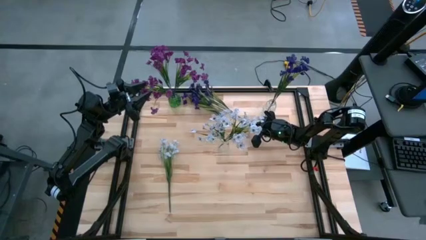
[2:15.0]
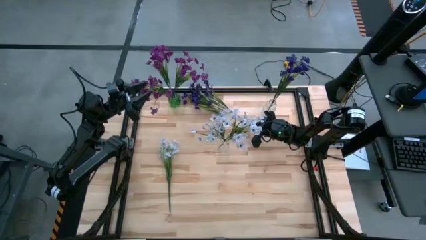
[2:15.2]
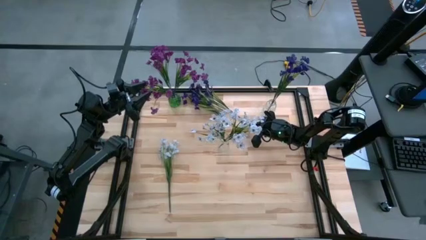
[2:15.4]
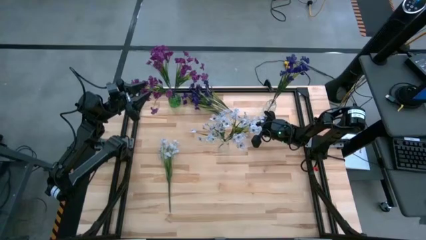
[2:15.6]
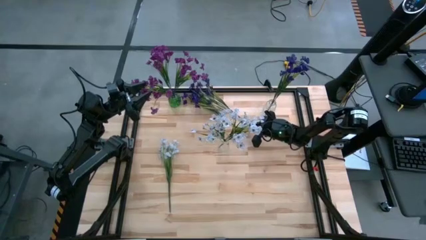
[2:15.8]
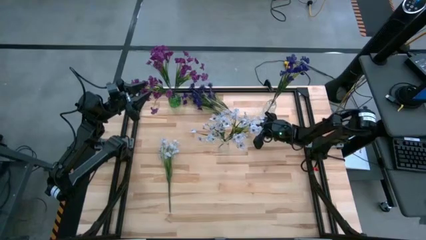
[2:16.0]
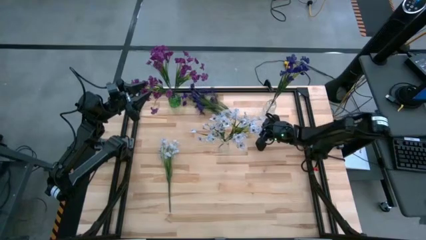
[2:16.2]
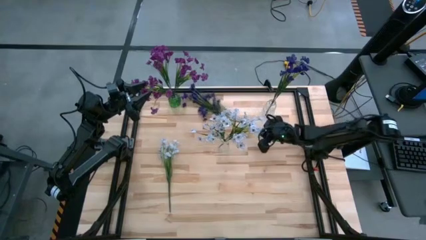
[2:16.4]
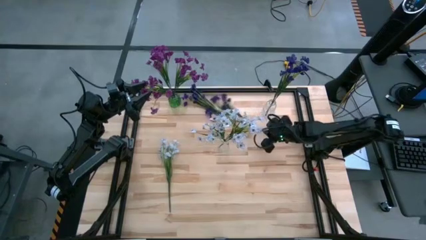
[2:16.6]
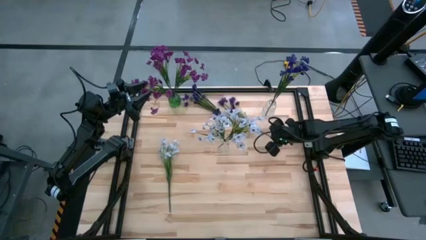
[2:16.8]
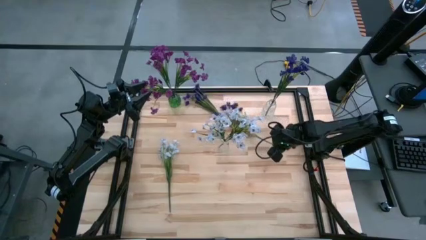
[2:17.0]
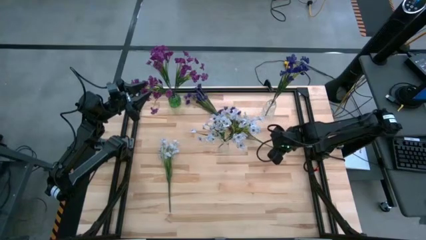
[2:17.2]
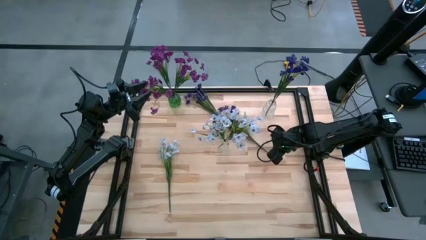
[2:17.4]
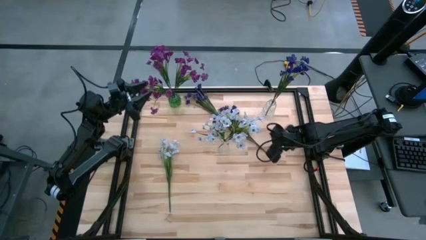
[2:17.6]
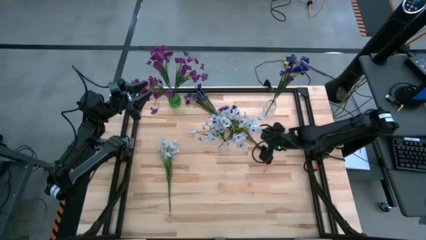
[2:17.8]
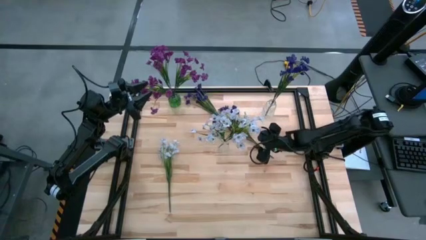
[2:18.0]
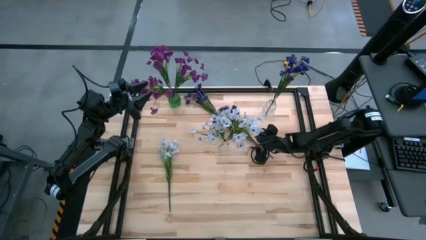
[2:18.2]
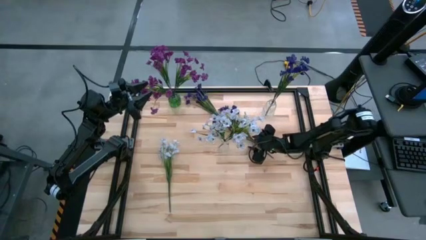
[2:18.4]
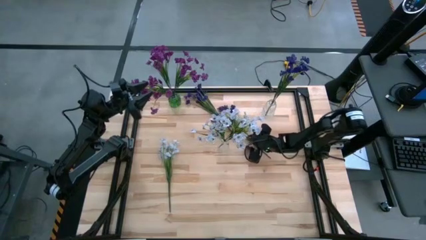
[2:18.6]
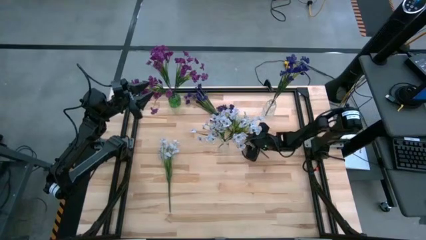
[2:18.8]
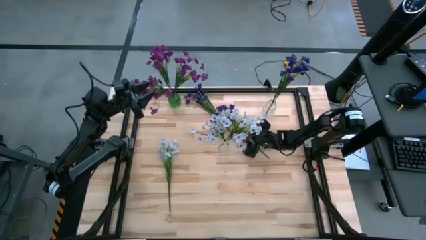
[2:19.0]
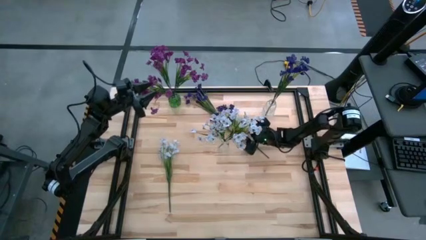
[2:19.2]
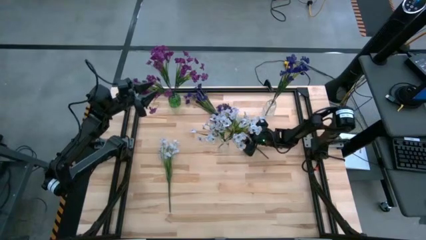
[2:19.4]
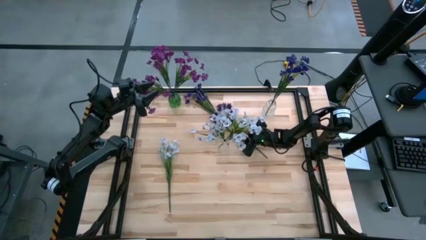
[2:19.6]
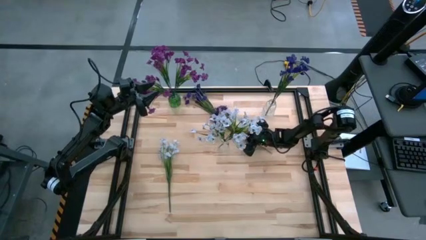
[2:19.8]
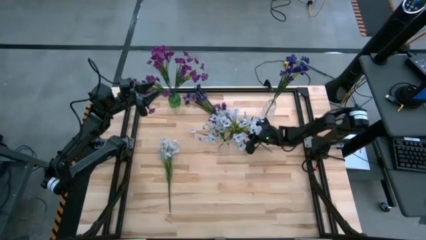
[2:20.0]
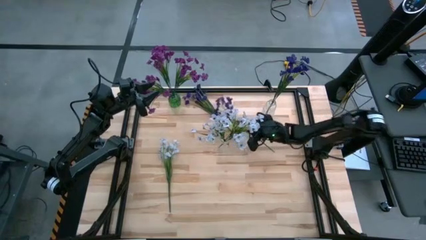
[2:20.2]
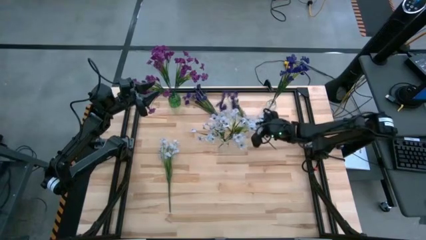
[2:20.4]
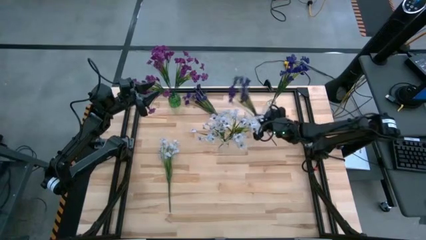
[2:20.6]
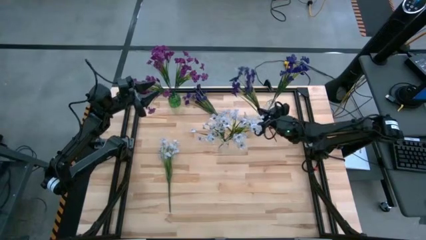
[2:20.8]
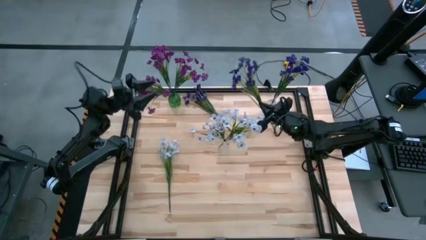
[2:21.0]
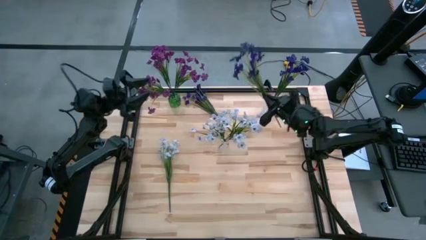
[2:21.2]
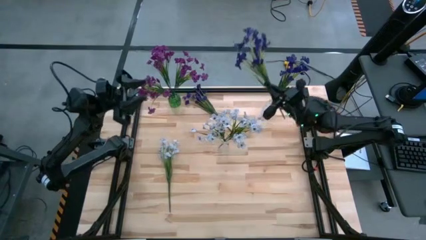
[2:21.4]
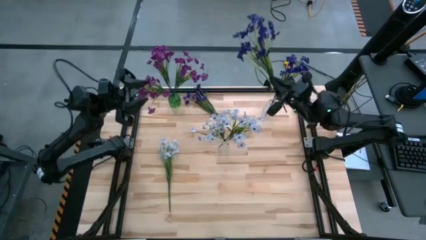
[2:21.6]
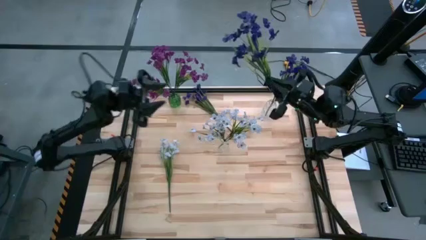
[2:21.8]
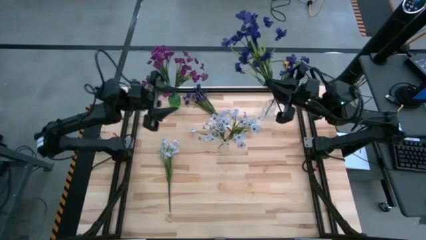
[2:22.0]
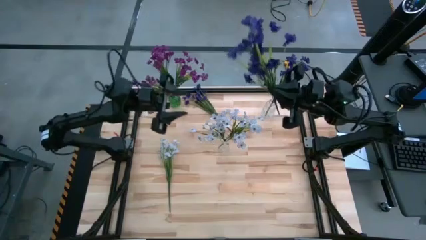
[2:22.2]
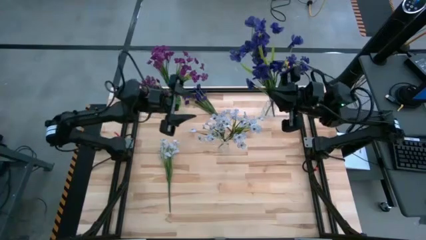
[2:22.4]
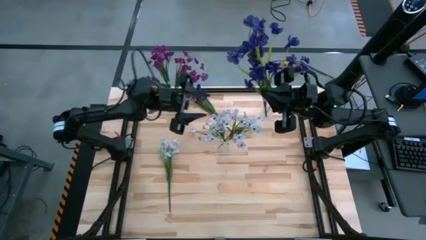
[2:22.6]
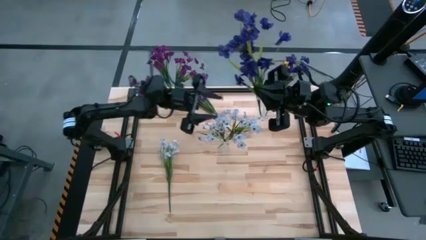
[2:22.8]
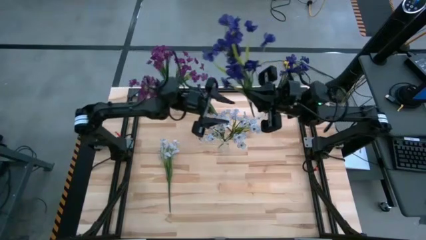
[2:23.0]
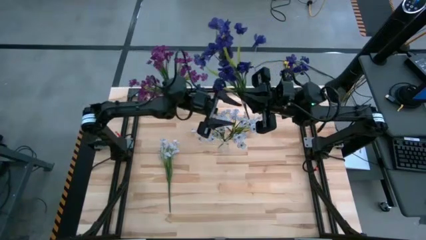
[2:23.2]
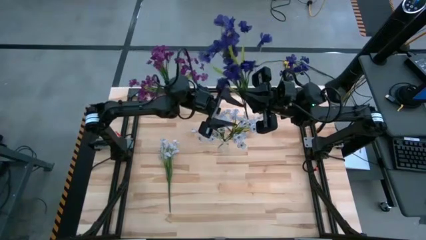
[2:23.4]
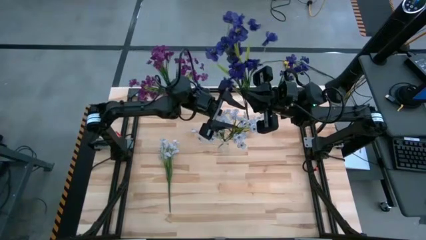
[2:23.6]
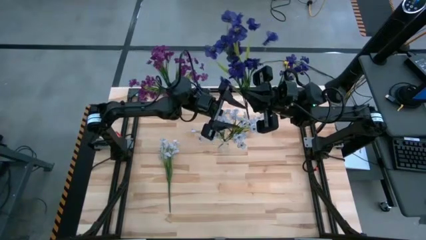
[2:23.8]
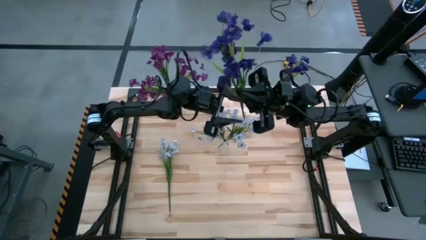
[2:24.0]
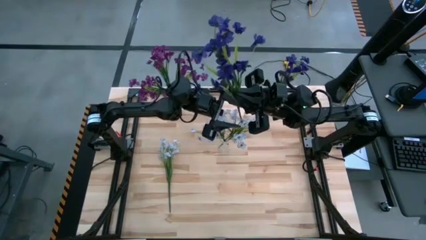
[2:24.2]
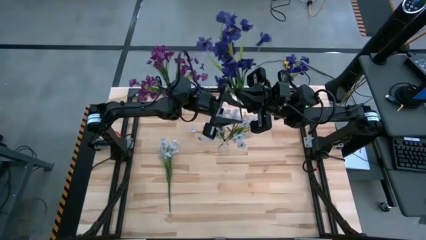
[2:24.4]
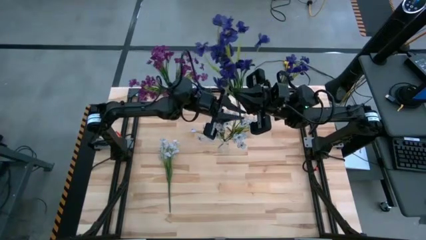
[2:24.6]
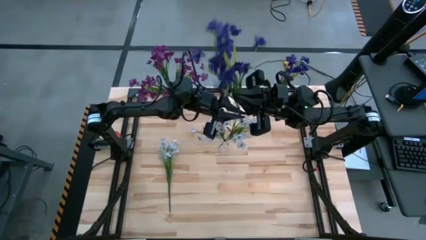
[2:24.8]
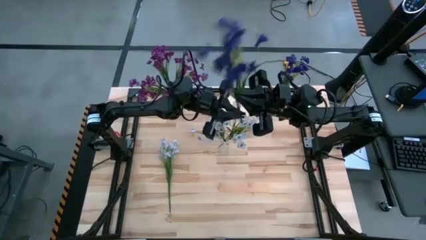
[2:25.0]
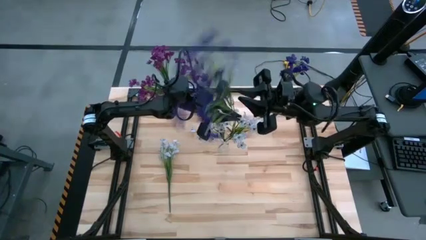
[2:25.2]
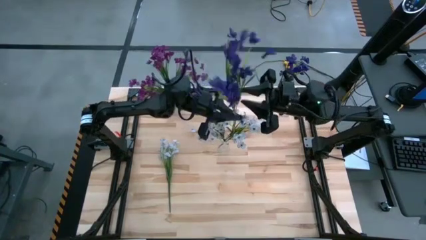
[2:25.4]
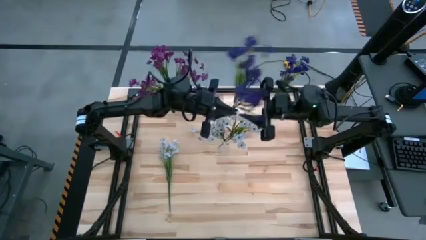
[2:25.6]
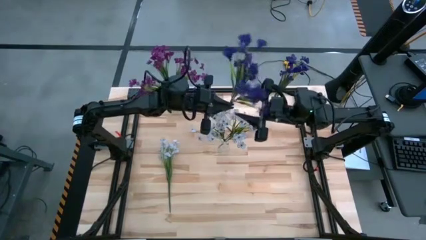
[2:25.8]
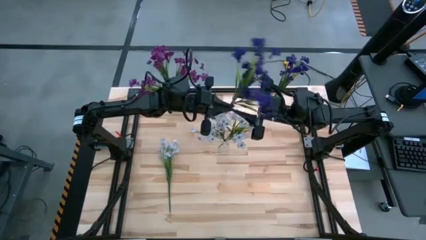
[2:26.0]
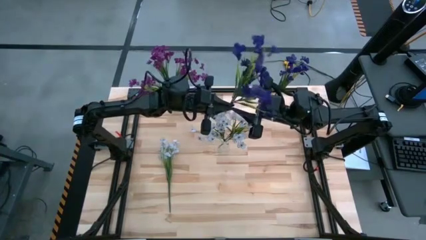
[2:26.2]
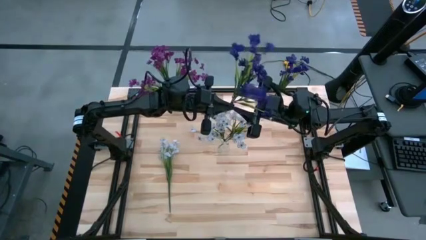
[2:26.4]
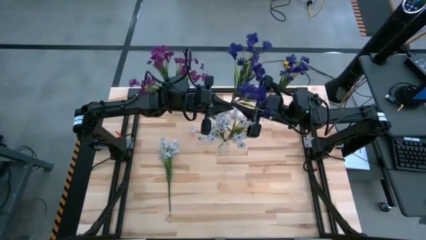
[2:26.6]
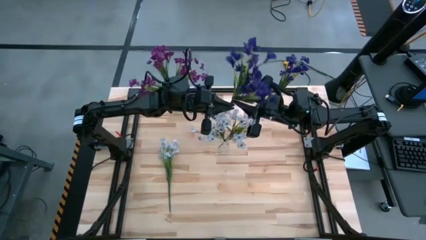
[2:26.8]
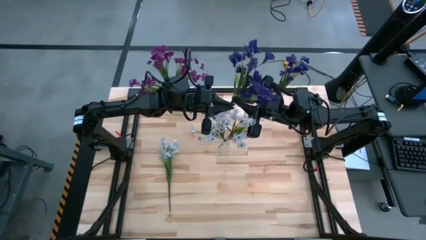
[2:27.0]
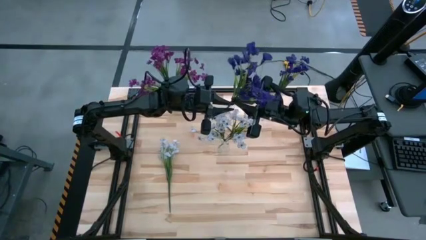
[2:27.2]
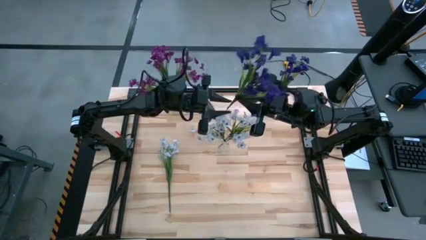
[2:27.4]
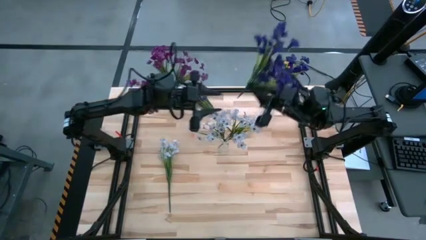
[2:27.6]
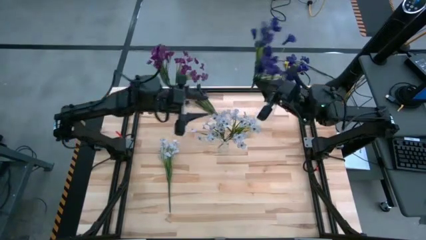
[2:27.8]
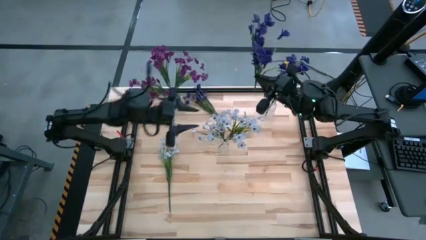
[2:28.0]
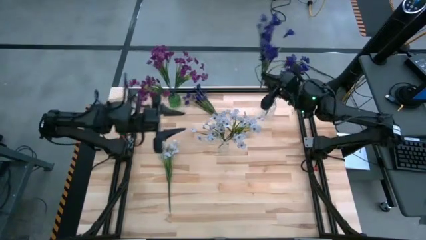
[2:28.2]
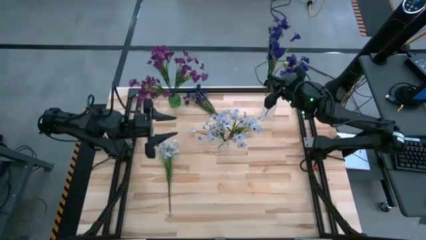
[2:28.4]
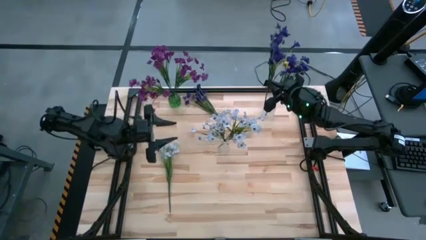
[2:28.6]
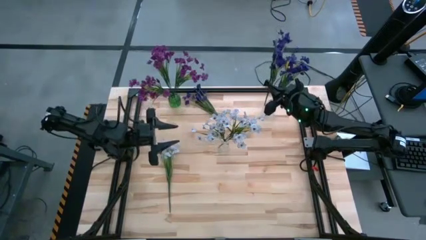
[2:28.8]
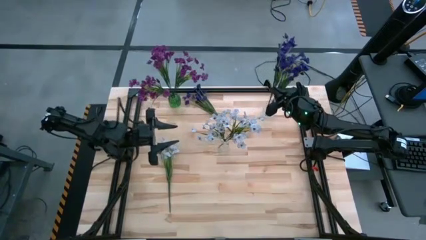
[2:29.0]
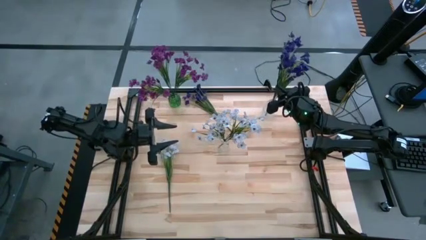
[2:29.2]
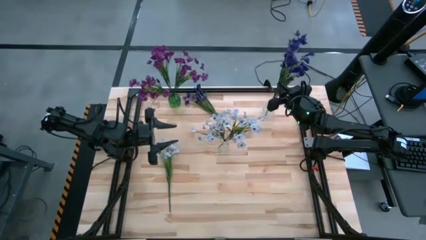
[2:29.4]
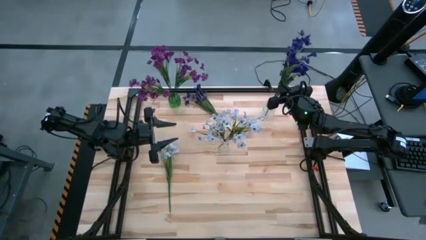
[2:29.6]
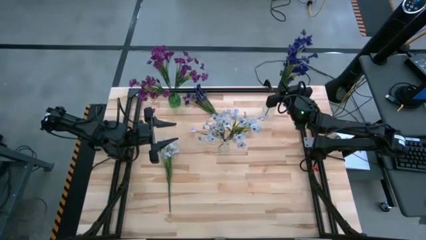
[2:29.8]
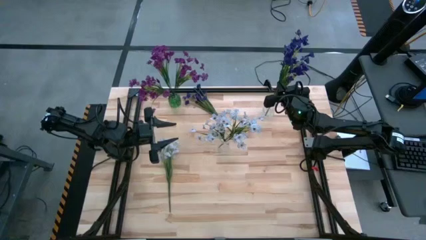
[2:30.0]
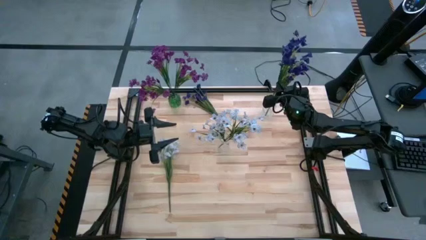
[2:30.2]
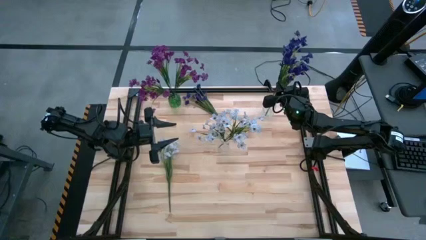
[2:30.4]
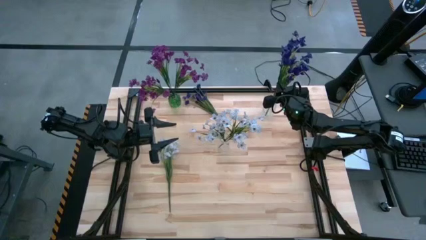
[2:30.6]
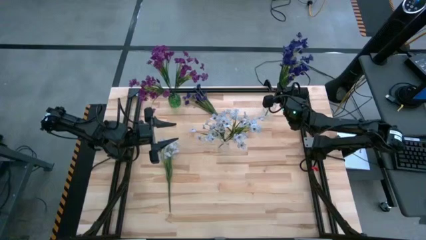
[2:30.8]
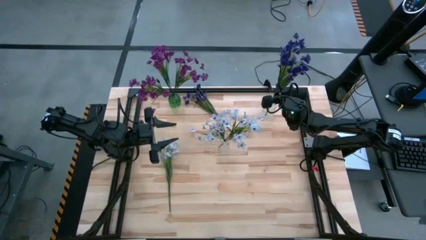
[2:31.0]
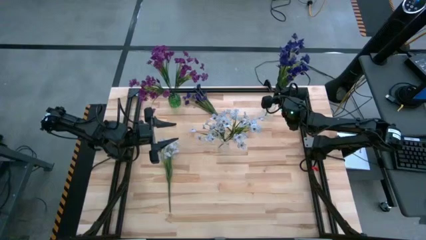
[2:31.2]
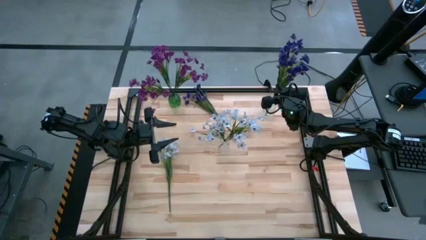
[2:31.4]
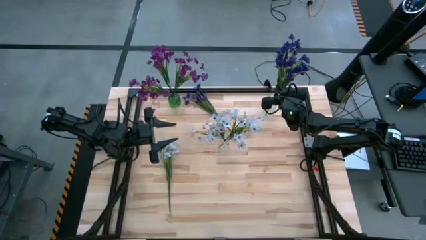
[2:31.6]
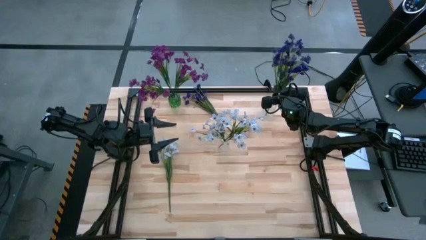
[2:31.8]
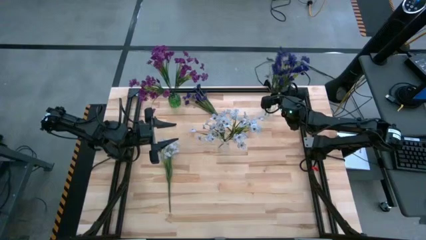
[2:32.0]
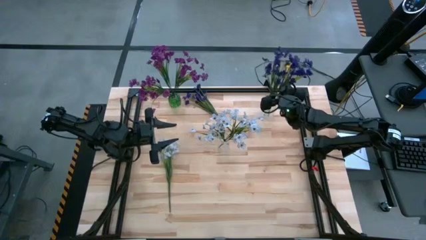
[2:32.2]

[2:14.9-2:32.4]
Task: Sort flowers into vase by color
Put the bottom blue flowers into the top transparent flower vase
